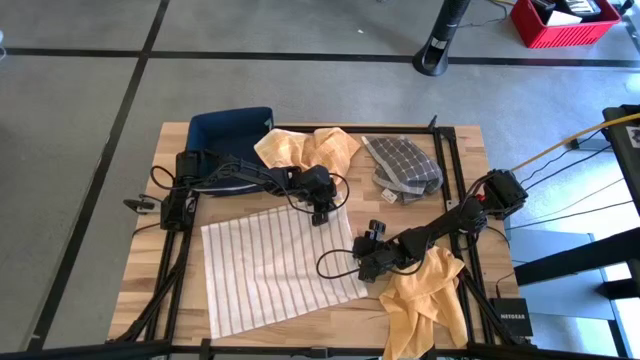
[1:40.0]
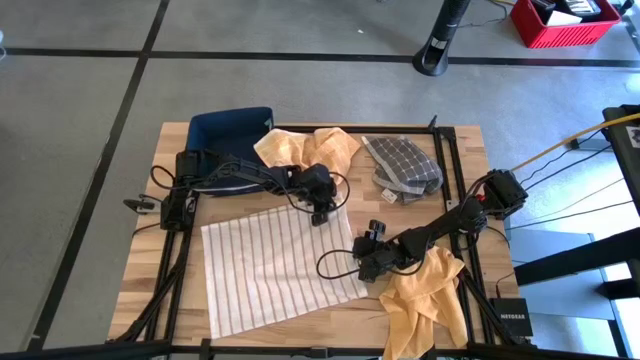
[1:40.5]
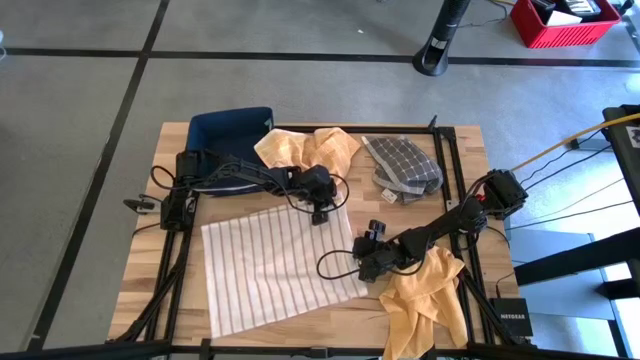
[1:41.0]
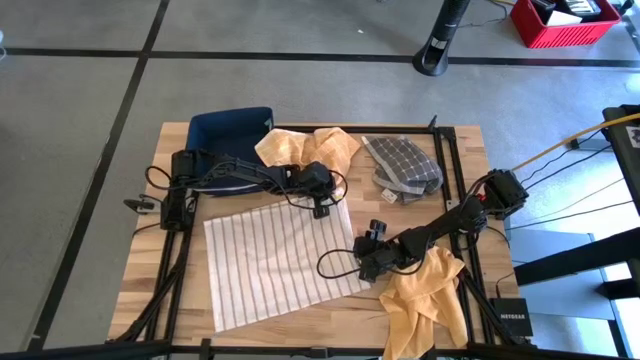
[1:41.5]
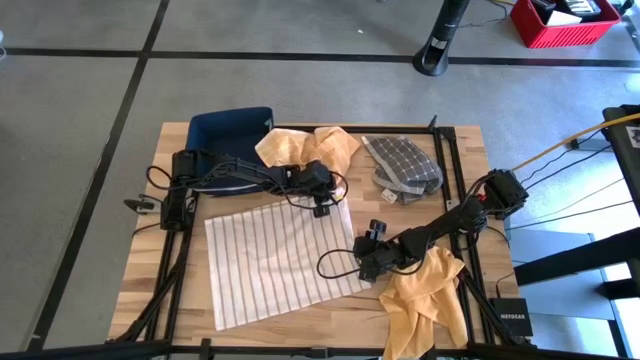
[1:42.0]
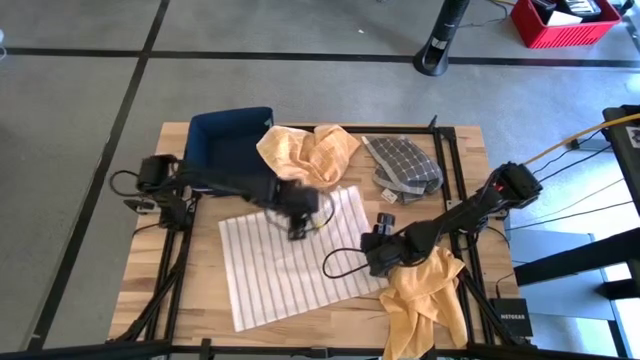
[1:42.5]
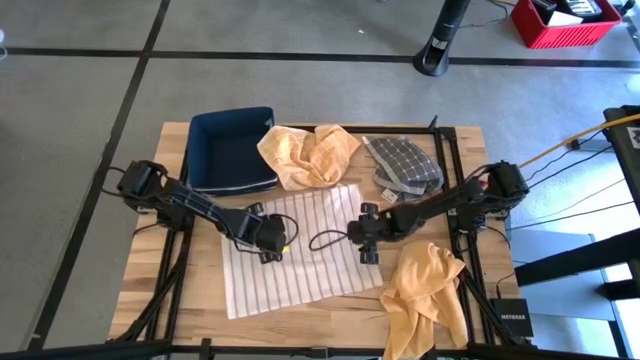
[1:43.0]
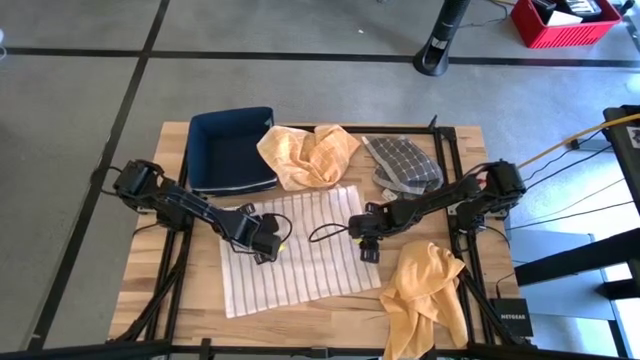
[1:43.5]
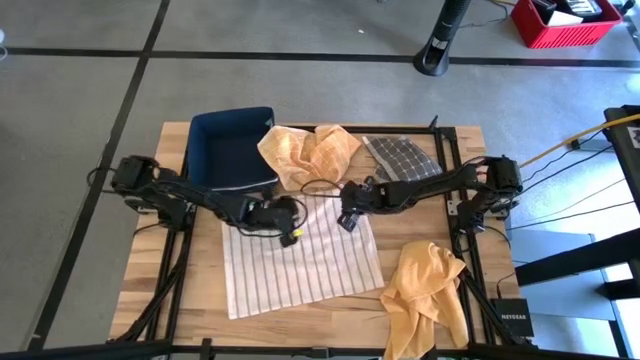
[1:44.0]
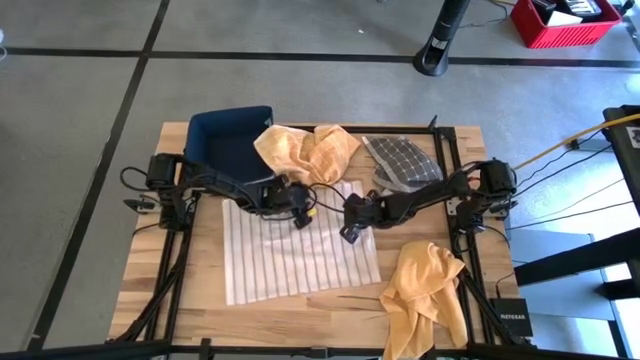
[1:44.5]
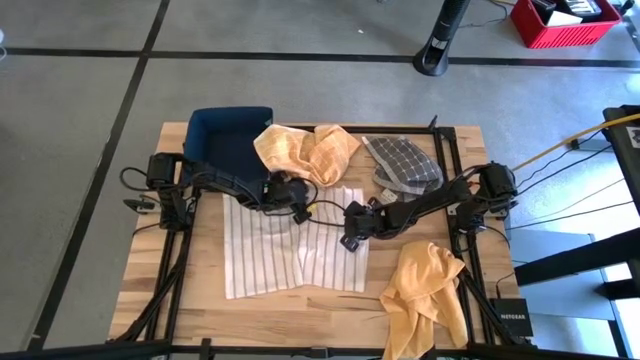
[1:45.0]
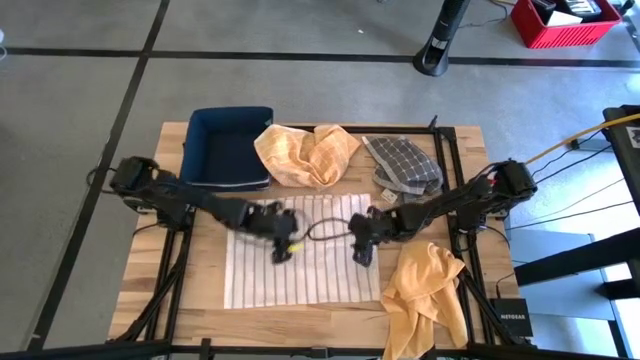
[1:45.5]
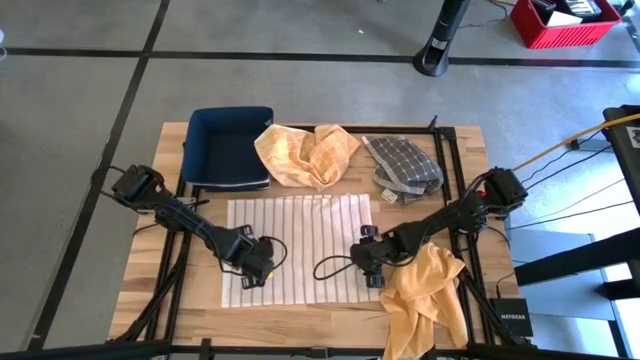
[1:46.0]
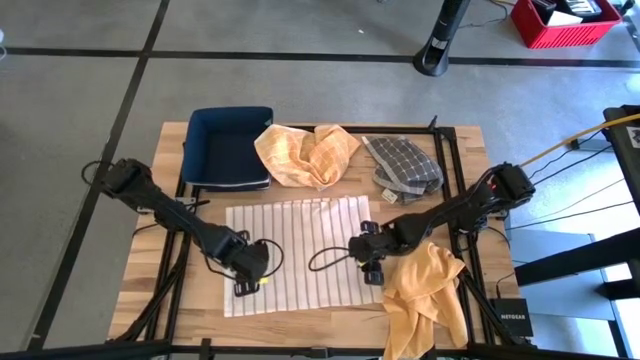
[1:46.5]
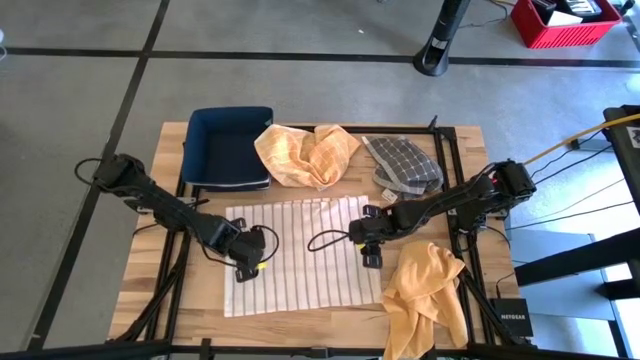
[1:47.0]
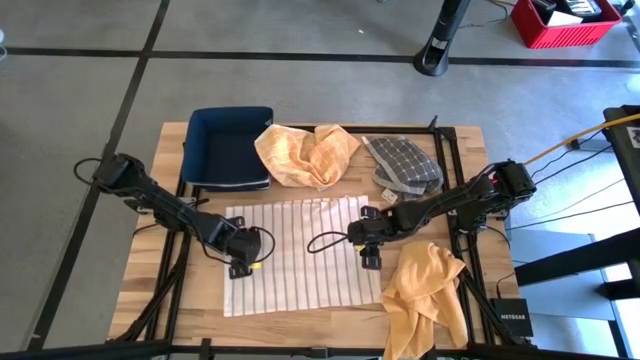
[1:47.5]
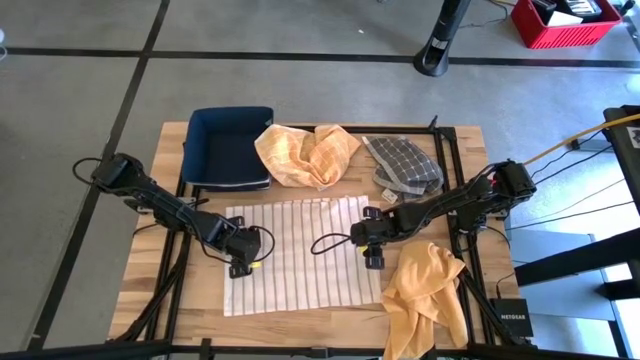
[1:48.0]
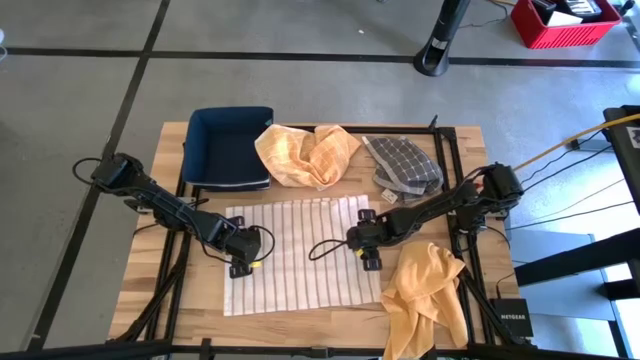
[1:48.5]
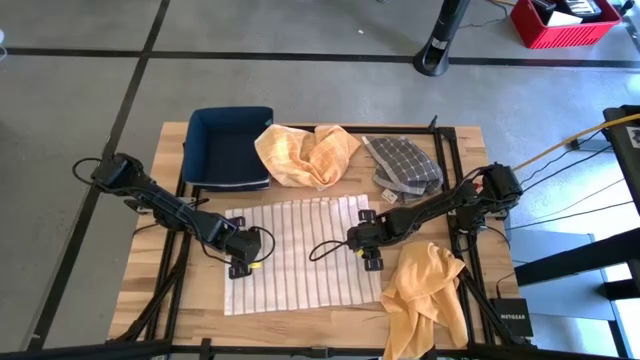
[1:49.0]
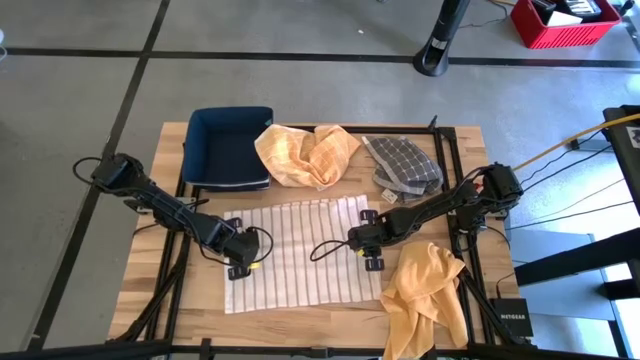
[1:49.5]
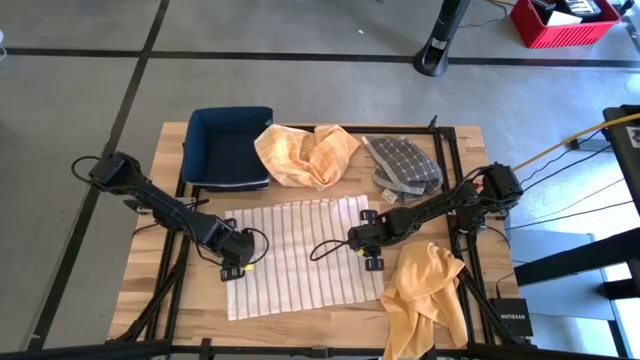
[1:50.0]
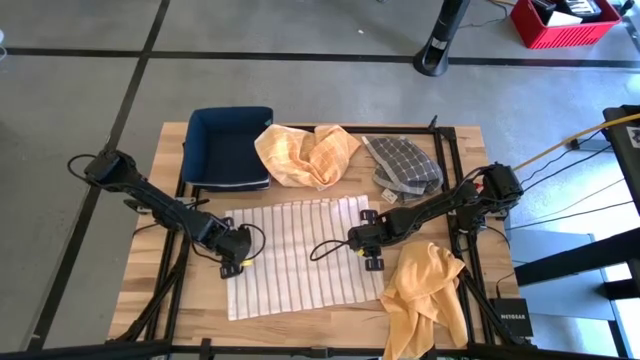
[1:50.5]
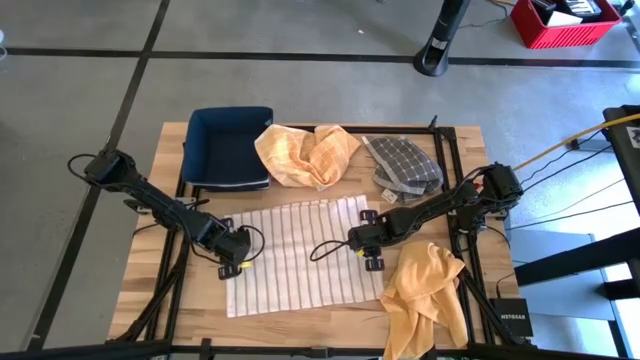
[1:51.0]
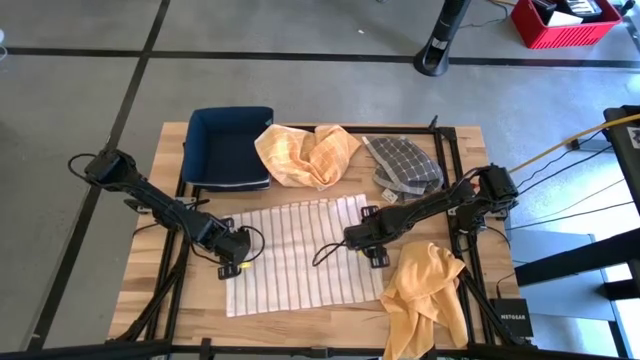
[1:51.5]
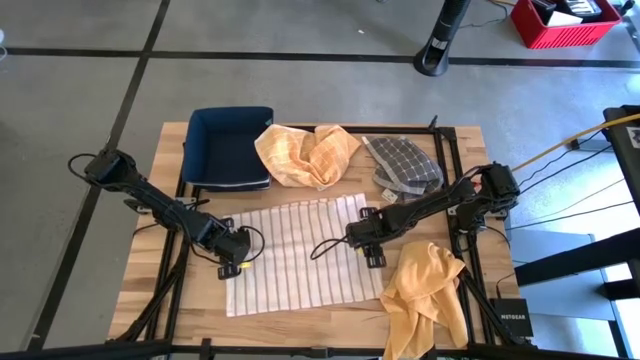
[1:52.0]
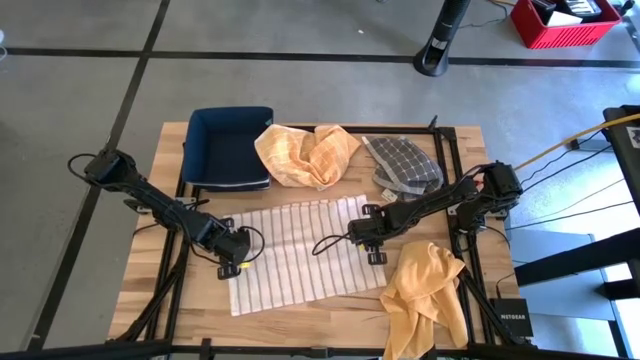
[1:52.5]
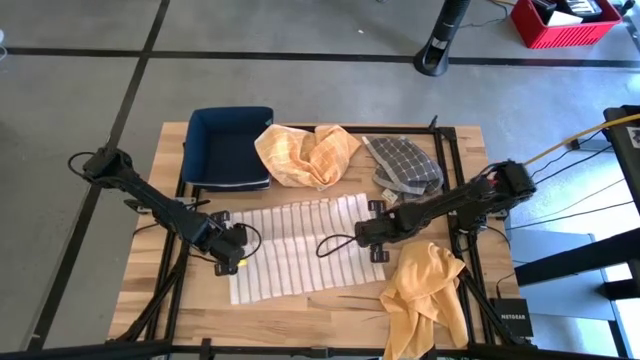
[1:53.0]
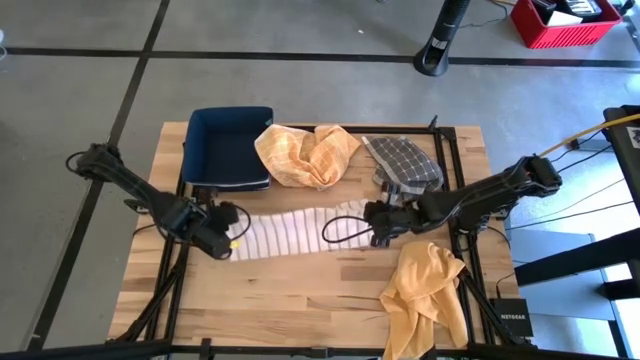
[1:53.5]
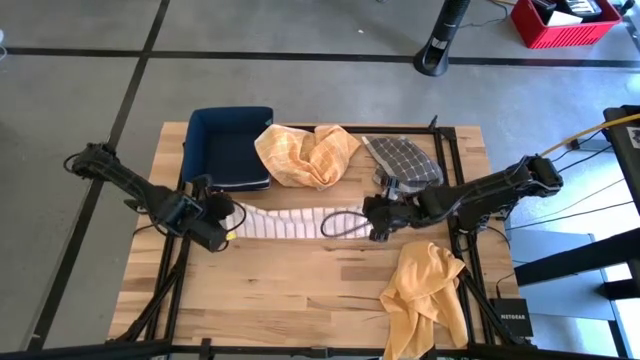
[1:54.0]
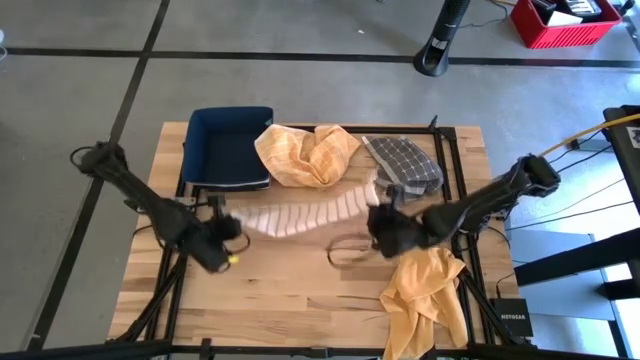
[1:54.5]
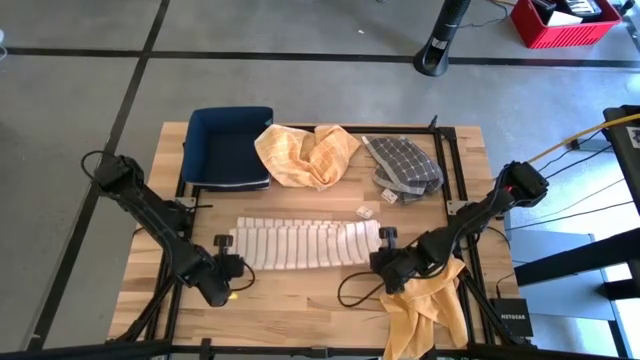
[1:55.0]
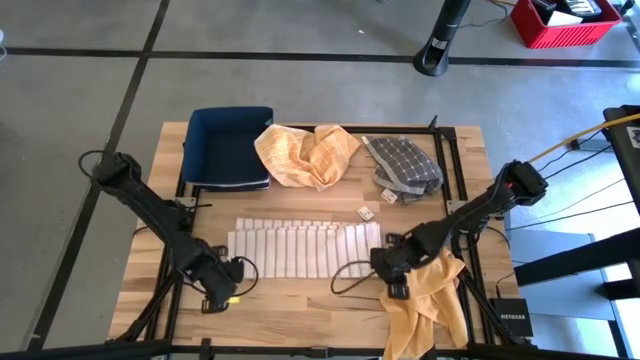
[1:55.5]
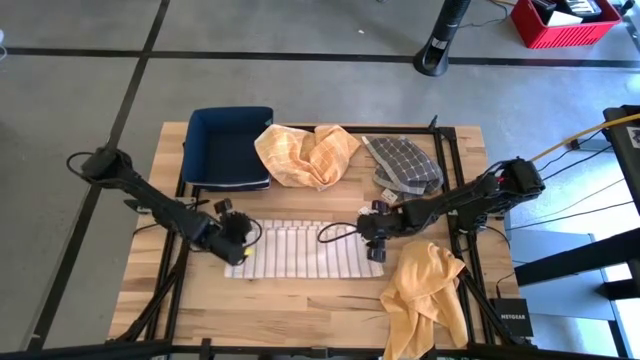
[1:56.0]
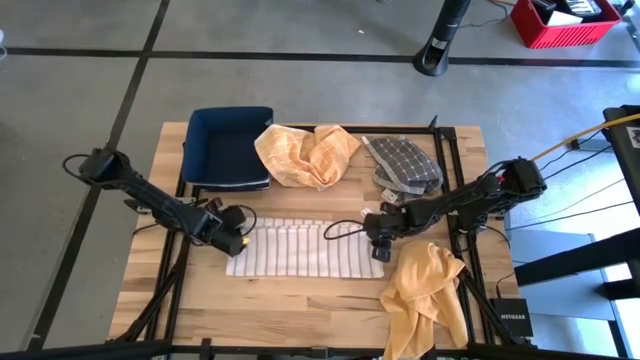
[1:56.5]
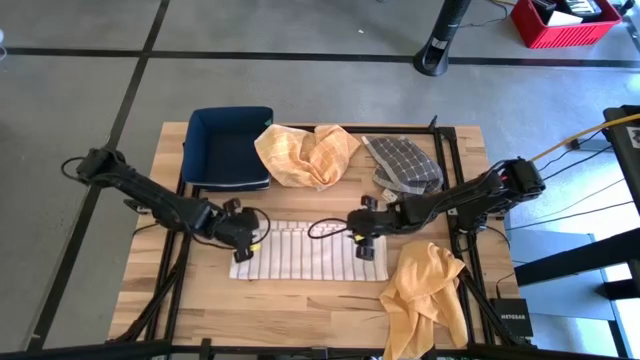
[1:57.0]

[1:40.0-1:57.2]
Task: Fold towel
Fold the white towel

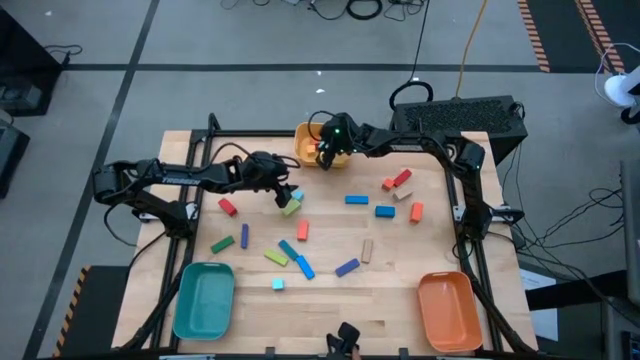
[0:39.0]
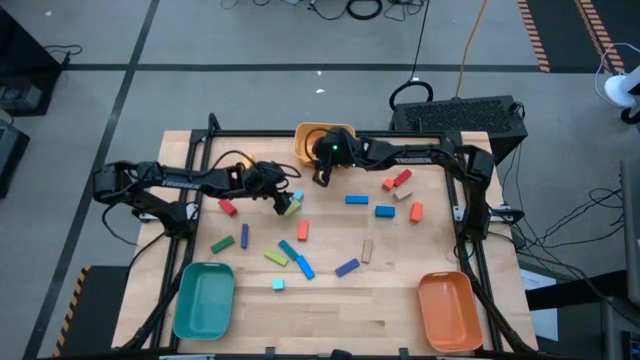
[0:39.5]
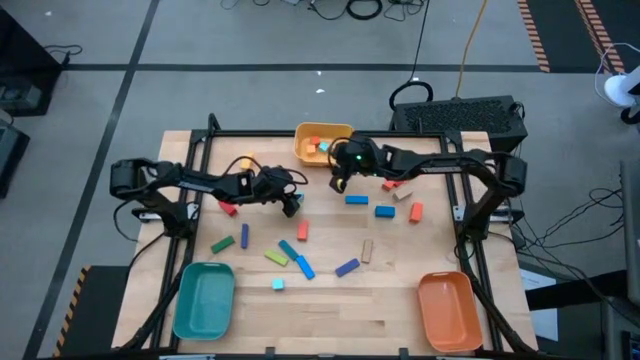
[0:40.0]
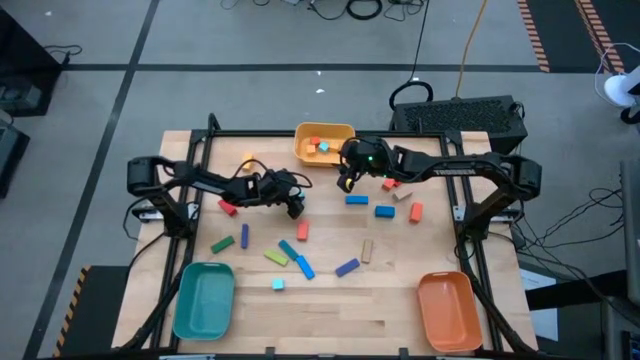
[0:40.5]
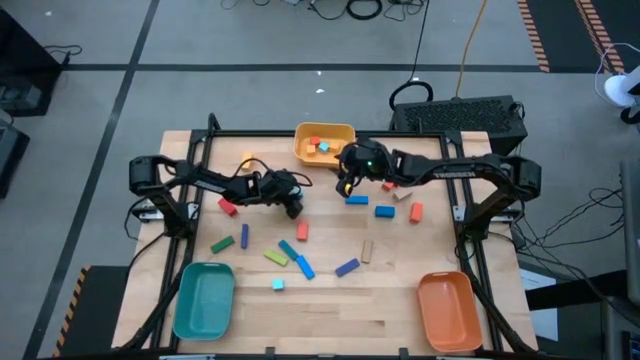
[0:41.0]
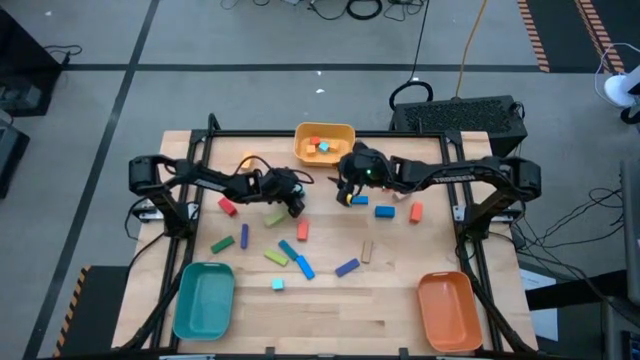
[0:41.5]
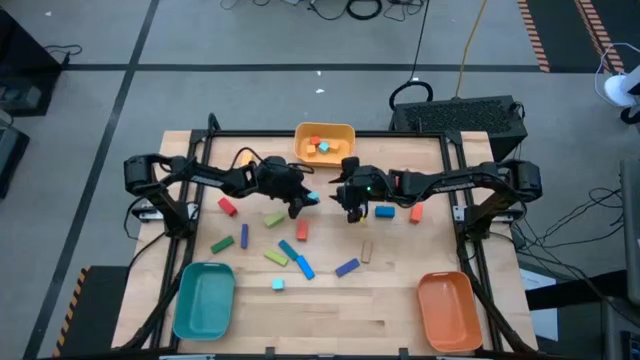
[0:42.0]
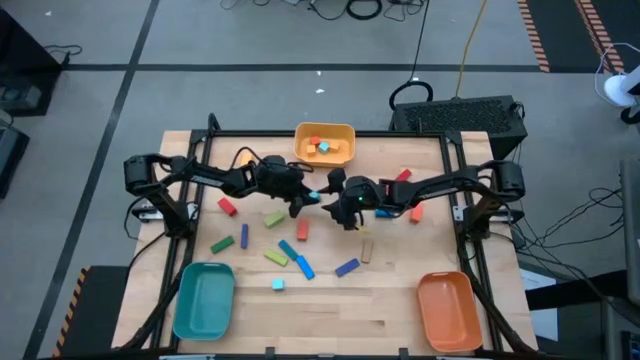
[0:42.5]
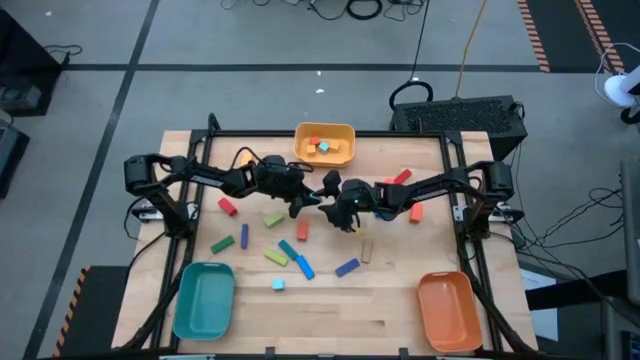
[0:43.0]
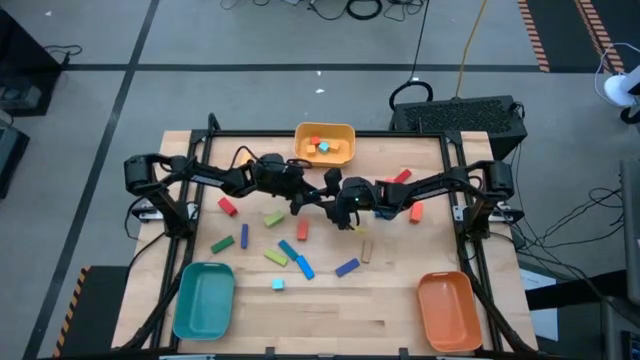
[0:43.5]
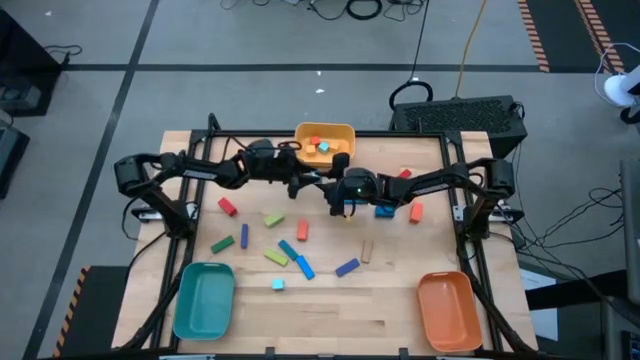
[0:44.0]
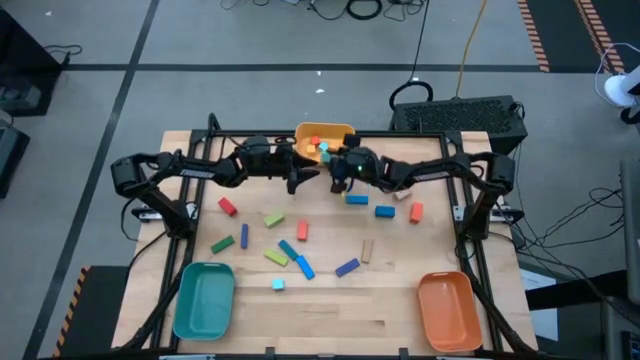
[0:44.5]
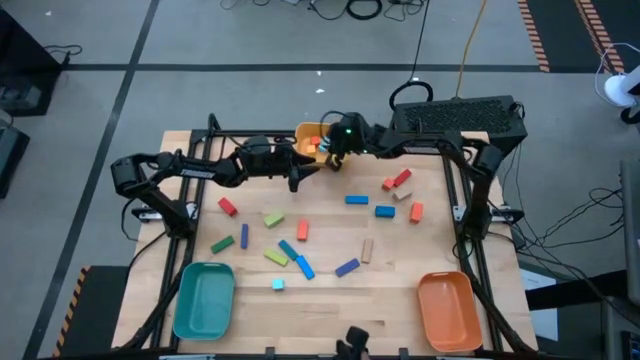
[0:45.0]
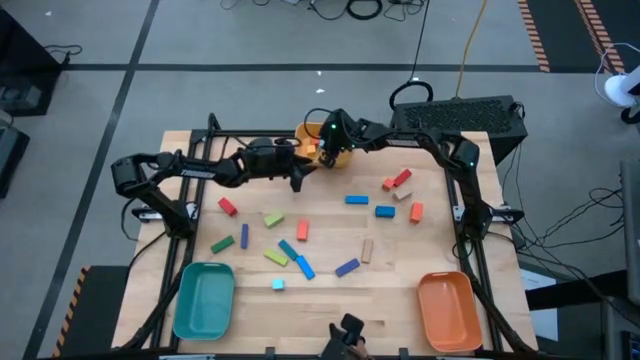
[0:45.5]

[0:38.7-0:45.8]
Task: Sort blocks by size
Put the top blue square block into the yellow bin
